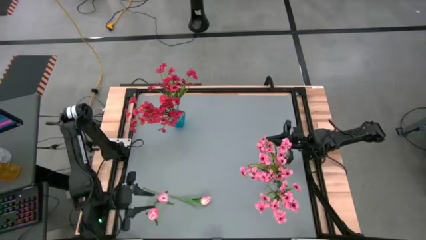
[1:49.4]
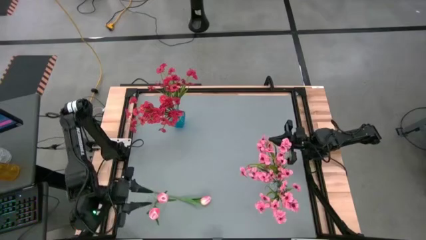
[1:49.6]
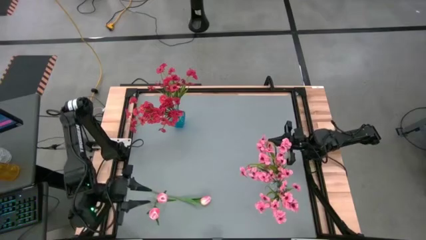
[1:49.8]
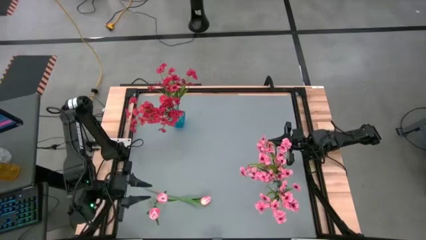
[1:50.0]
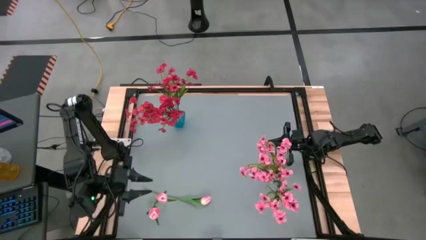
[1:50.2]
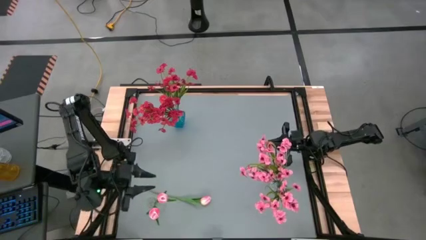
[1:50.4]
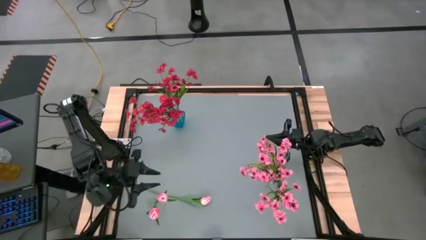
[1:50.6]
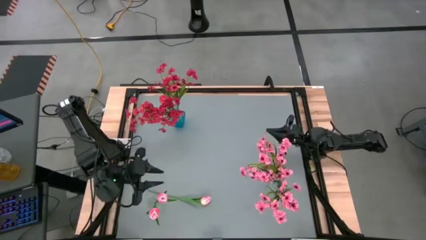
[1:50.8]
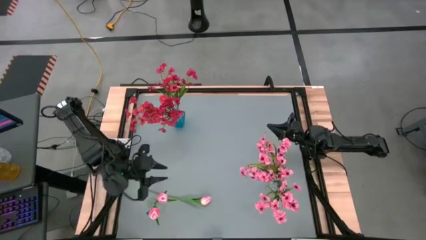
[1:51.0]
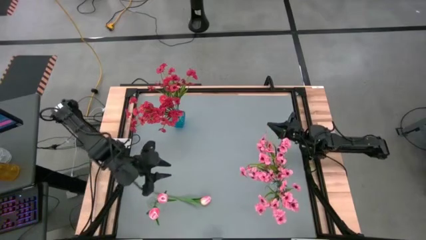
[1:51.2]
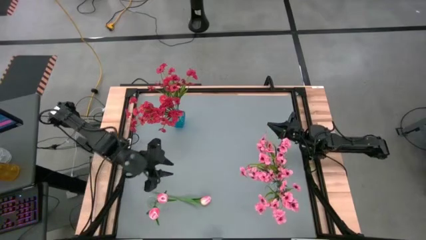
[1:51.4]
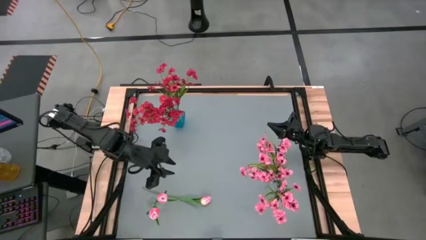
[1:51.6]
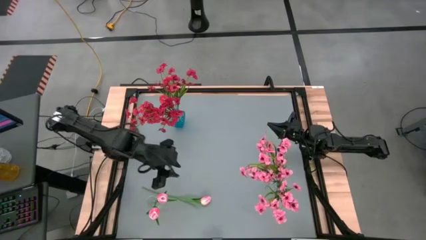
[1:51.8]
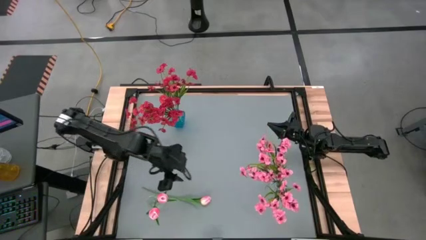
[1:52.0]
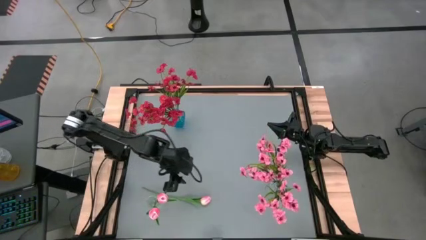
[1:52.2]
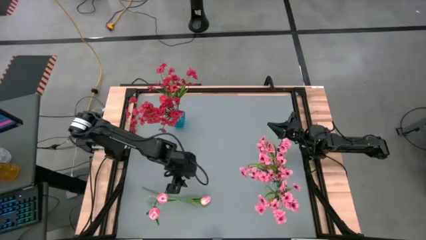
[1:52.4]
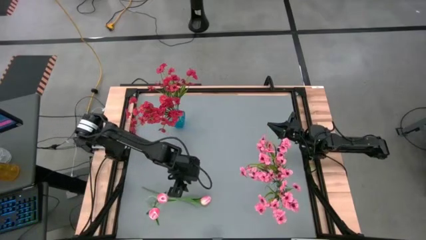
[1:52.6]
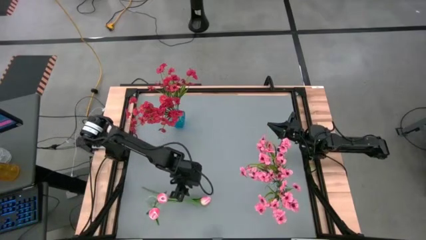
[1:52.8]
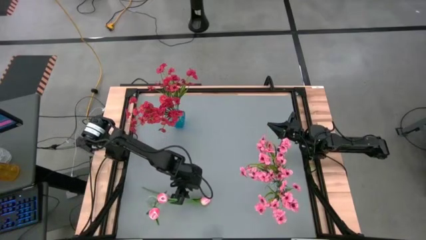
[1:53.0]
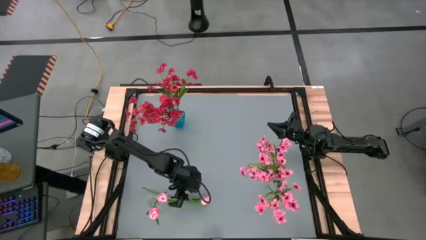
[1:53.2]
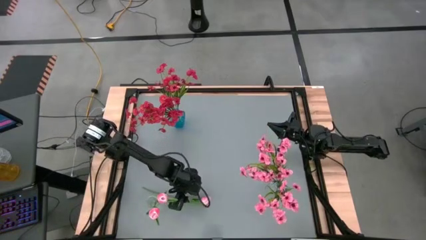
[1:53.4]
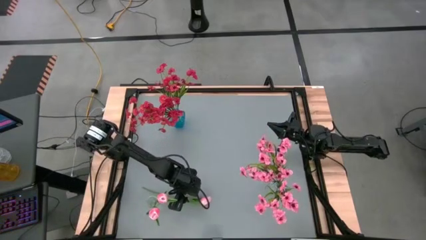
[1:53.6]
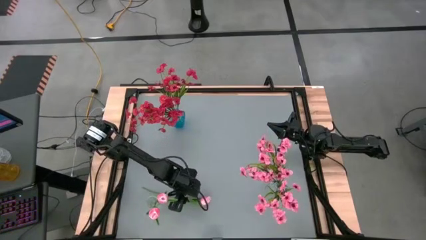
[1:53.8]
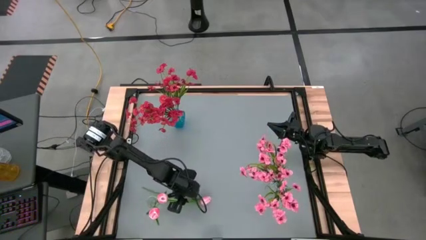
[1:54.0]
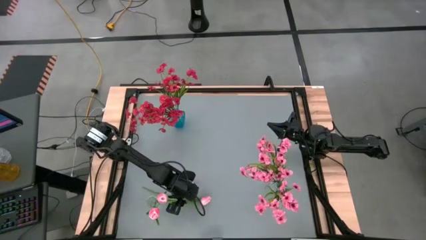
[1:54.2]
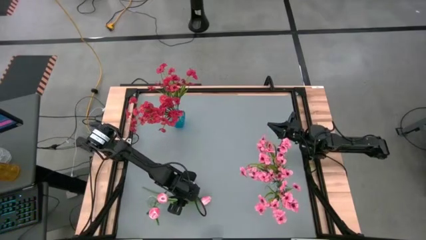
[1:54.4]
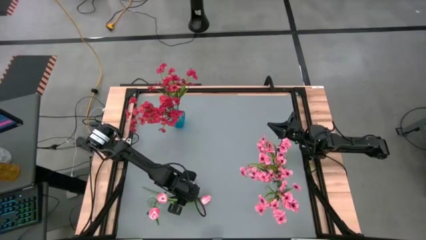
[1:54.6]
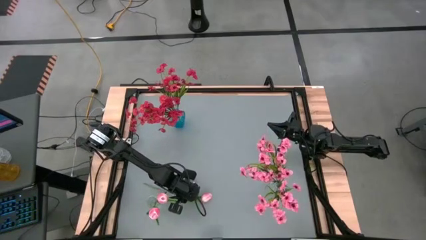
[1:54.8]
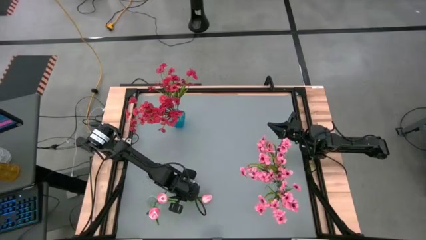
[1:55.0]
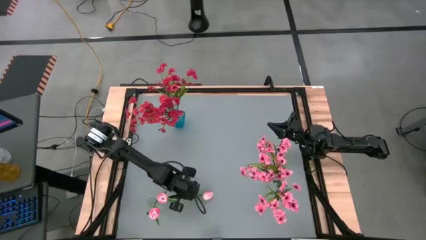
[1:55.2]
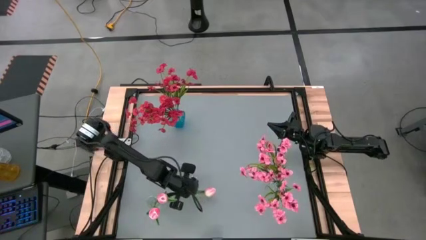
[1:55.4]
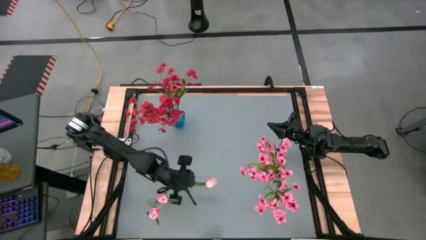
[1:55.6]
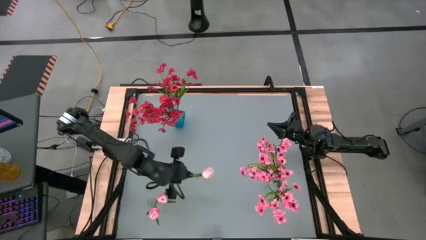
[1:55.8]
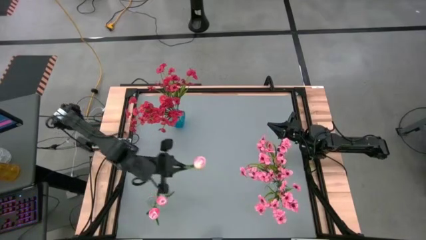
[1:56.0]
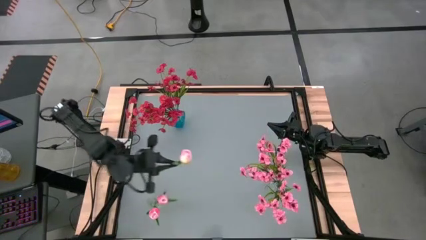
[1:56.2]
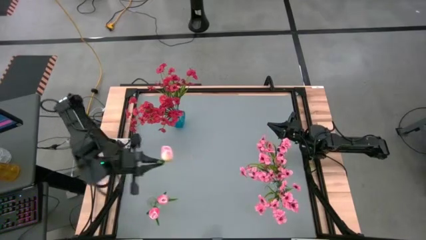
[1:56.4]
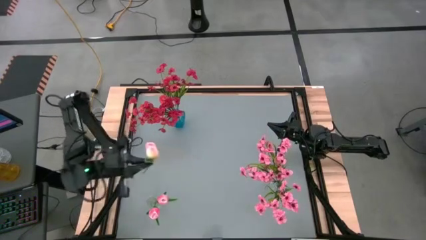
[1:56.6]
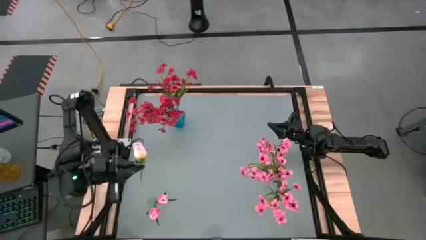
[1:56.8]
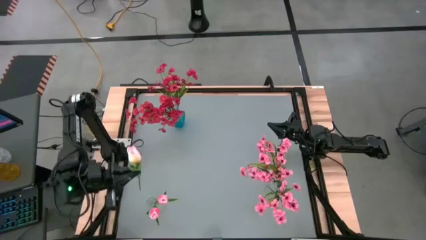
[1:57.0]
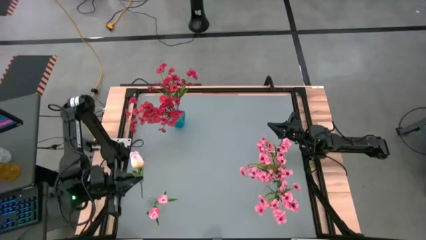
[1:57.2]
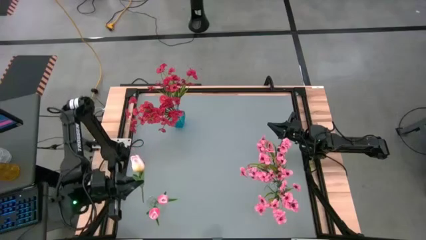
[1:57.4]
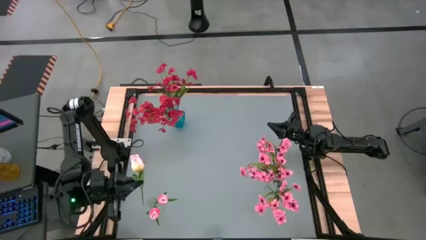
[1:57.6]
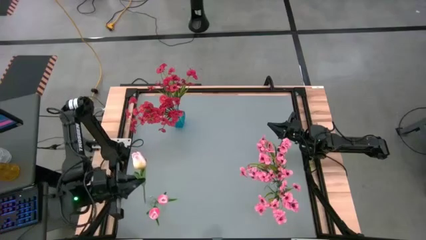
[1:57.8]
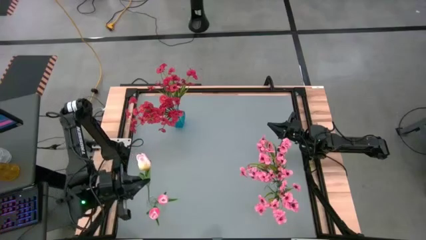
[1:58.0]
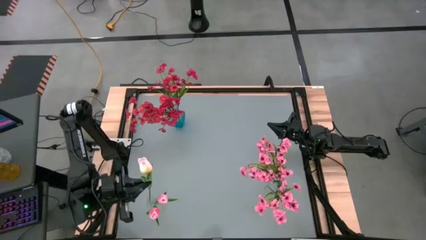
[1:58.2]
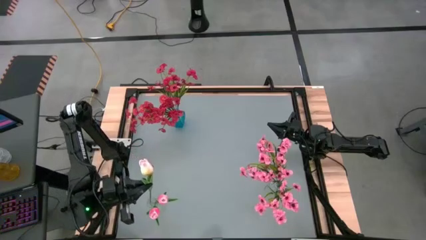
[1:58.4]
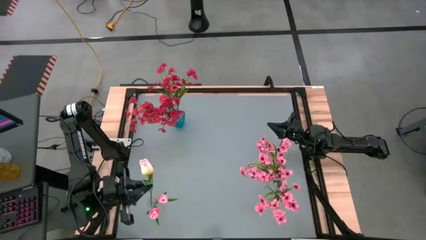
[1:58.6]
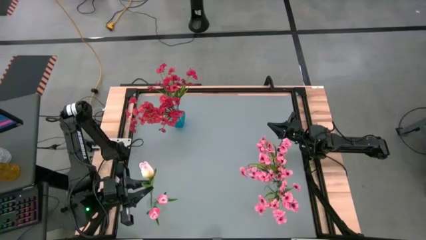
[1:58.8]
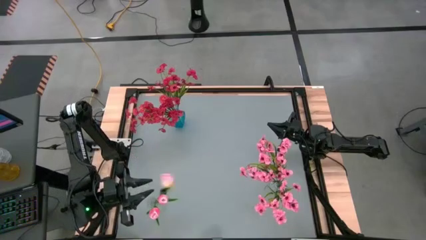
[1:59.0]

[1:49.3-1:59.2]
Task: Sort flowers into vase by color
Put the pink tulip into the left transparent vase

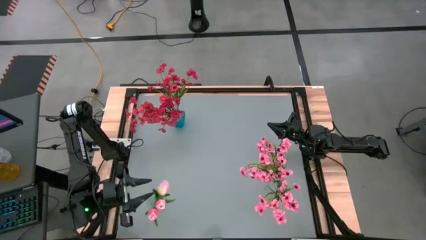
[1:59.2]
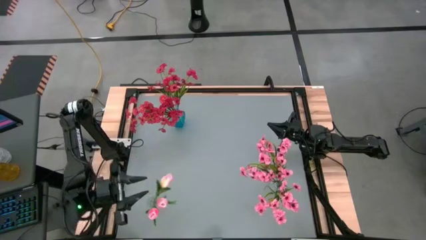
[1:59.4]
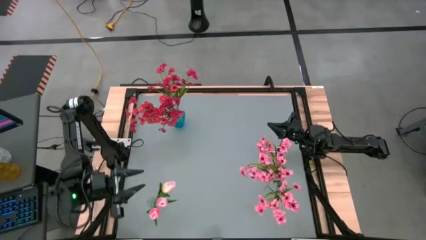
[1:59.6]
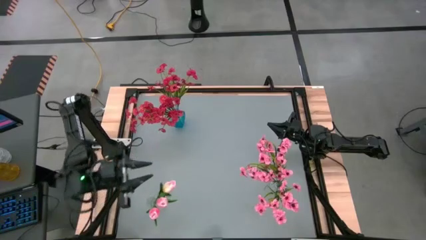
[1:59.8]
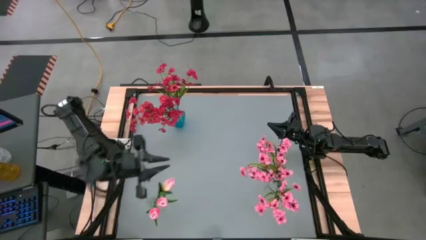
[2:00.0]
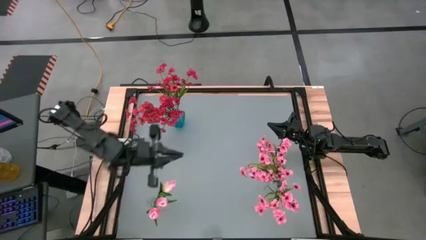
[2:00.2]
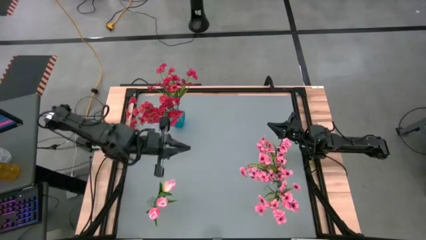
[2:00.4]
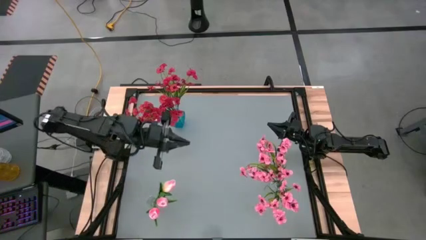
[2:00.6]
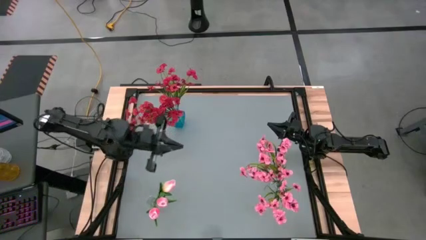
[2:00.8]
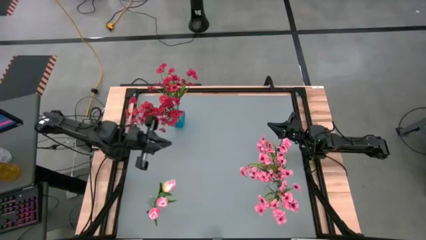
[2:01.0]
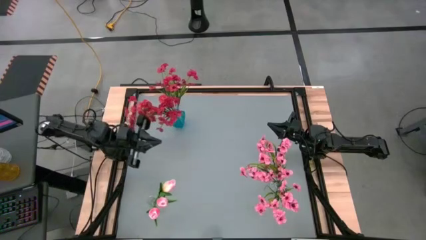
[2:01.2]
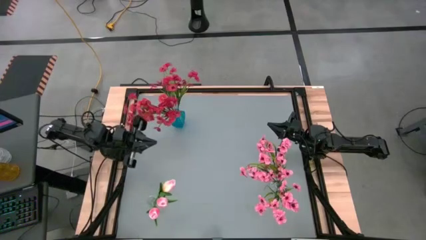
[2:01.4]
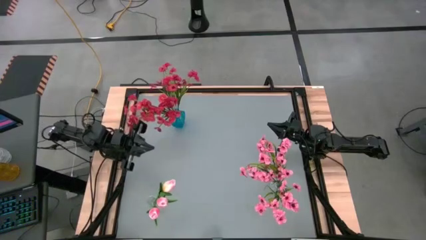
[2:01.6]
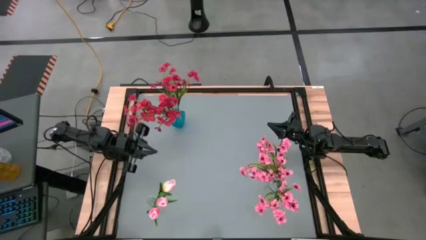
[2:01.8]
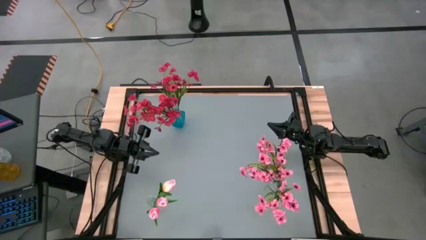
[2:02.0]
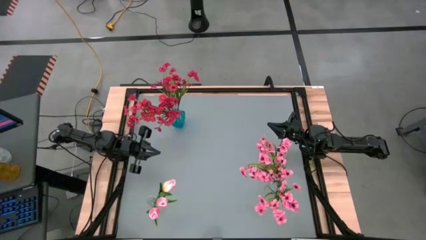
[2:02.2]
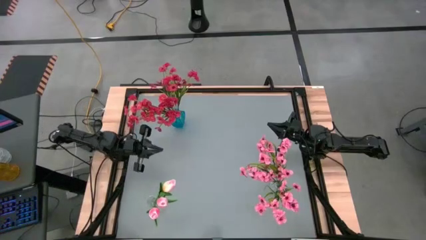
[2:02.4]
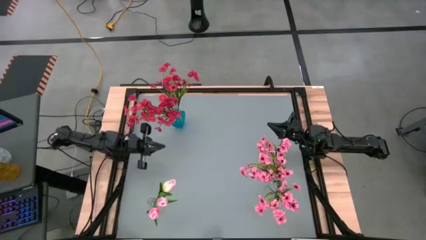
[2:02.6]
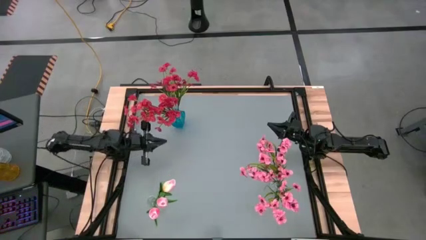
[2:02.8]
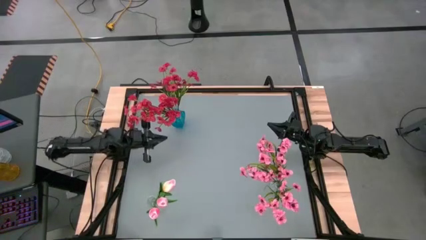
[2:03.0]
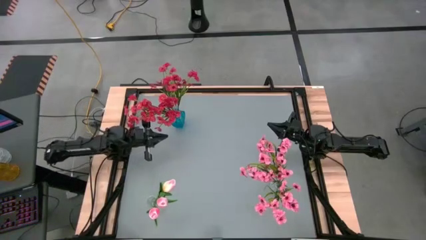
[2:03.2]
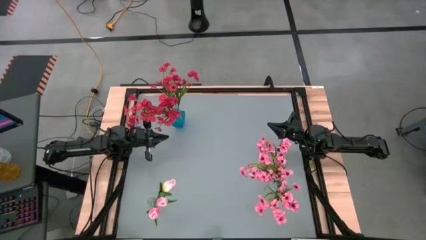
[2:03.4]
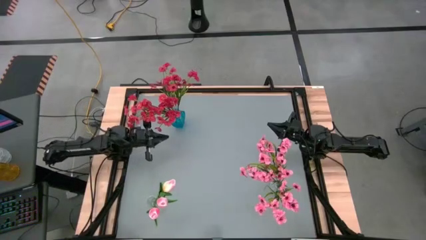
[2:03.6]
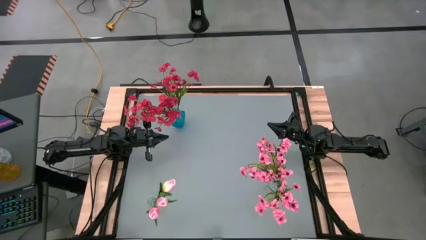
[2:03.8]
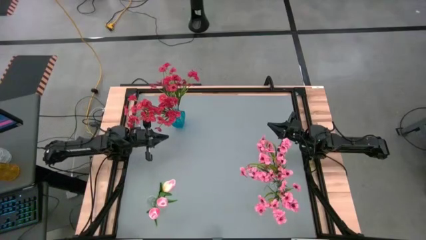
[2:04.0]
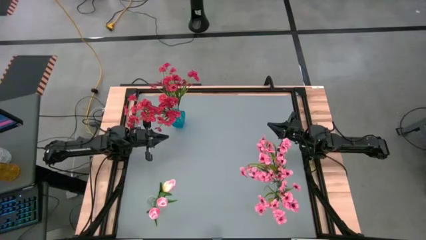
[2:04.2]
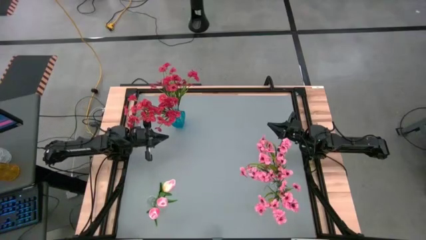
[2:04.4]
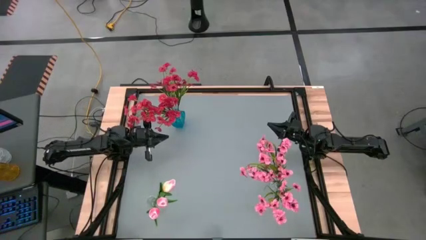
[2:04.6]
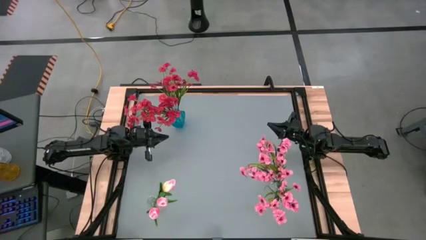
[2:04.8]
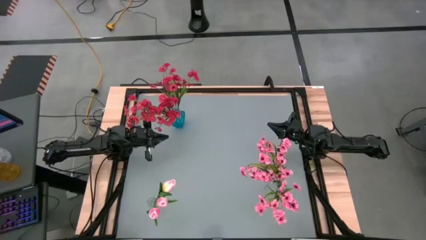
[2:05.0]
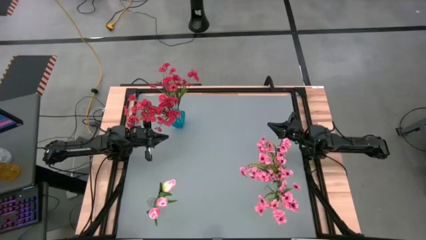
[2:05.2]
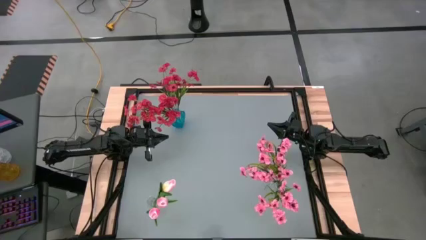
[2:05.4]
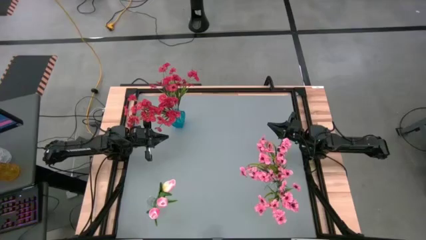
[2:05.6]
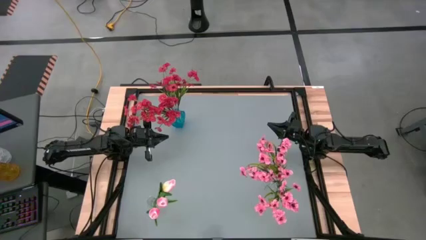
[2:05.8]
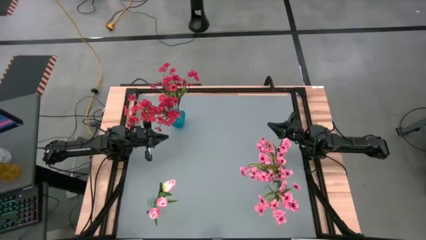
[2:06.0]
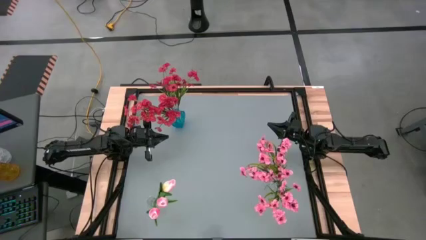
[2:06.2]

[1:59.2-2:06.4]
Return to Home Position
